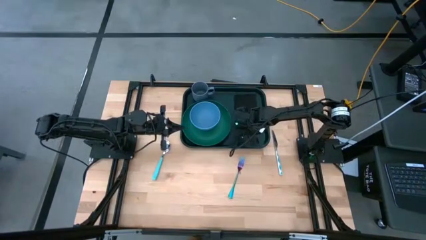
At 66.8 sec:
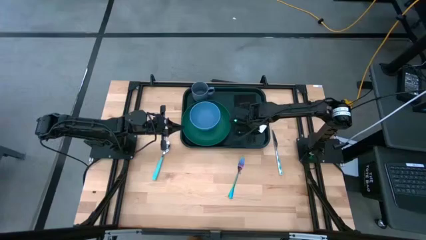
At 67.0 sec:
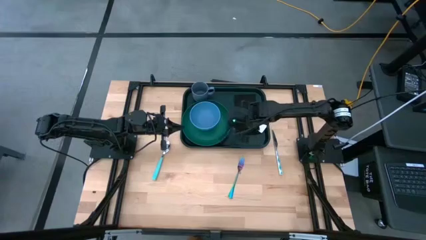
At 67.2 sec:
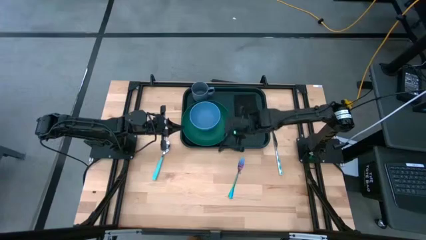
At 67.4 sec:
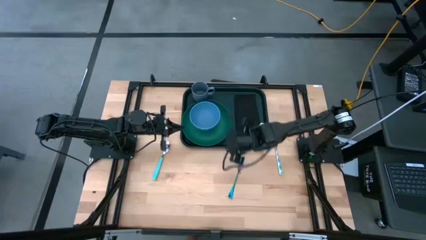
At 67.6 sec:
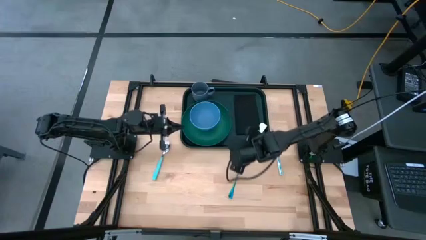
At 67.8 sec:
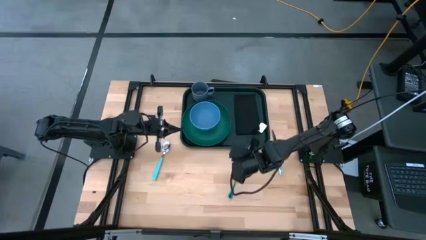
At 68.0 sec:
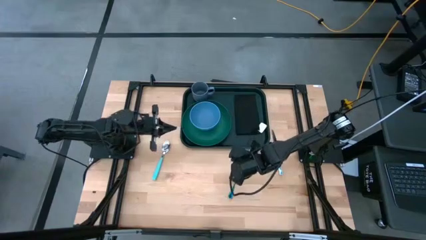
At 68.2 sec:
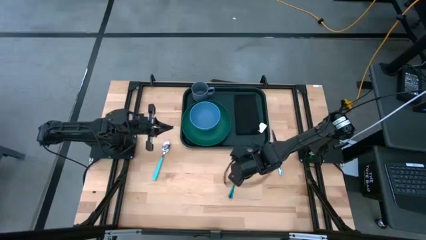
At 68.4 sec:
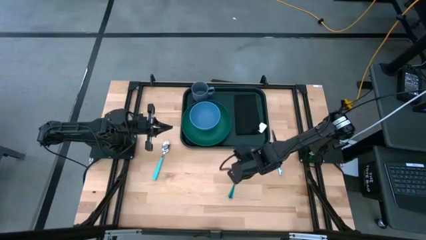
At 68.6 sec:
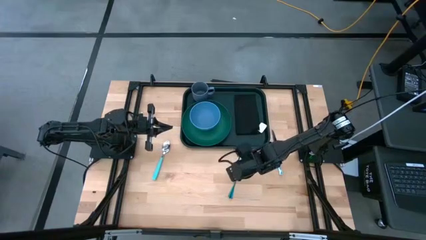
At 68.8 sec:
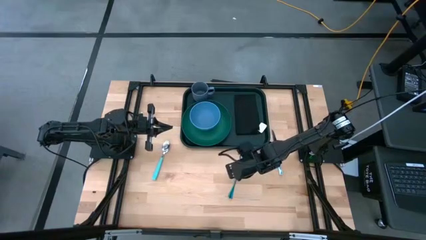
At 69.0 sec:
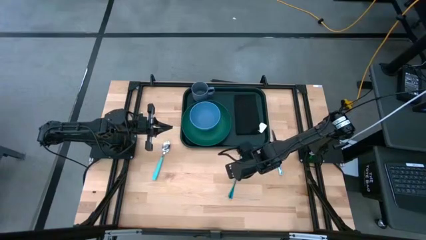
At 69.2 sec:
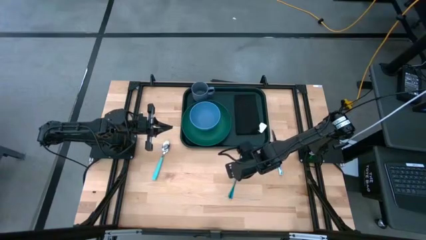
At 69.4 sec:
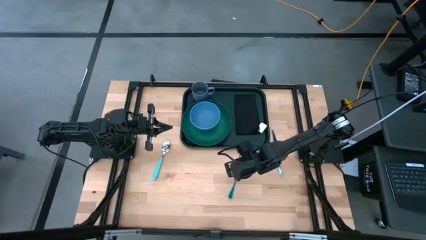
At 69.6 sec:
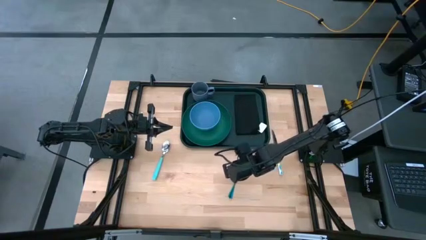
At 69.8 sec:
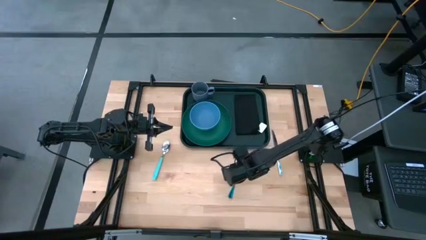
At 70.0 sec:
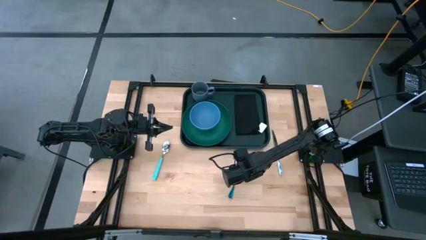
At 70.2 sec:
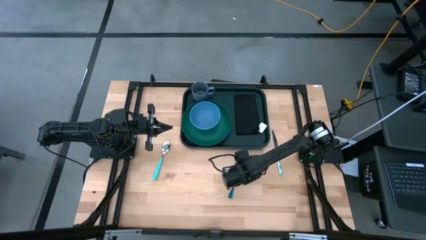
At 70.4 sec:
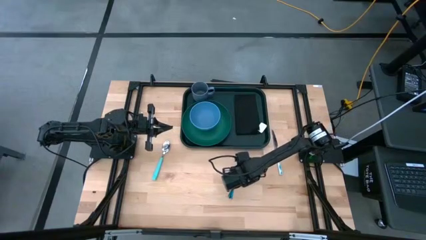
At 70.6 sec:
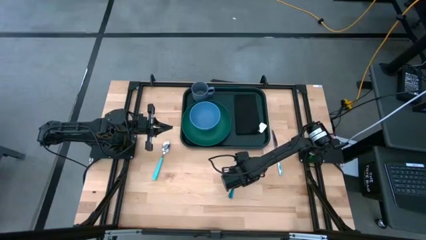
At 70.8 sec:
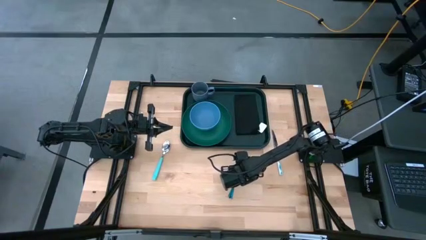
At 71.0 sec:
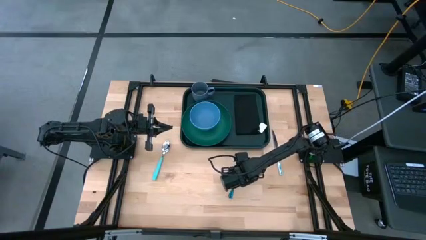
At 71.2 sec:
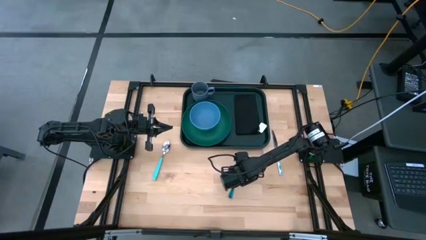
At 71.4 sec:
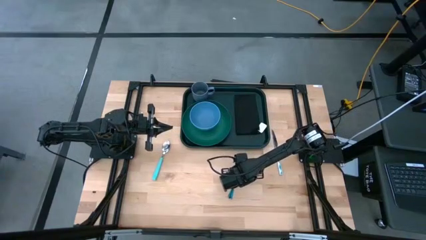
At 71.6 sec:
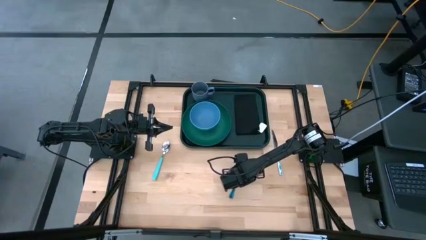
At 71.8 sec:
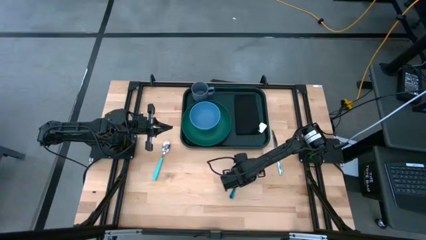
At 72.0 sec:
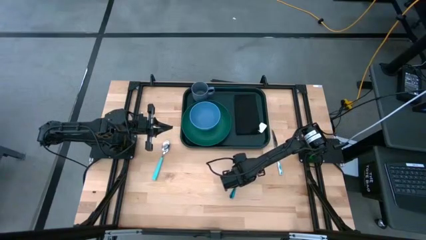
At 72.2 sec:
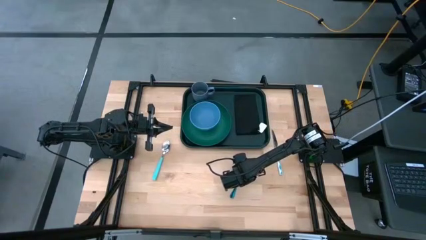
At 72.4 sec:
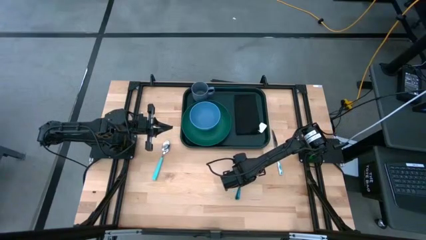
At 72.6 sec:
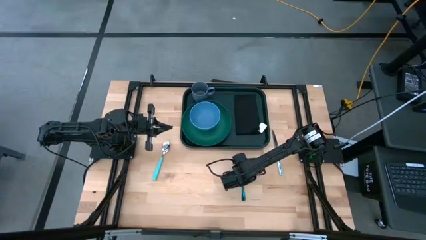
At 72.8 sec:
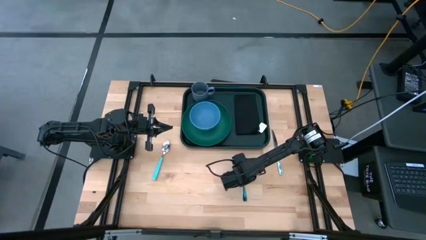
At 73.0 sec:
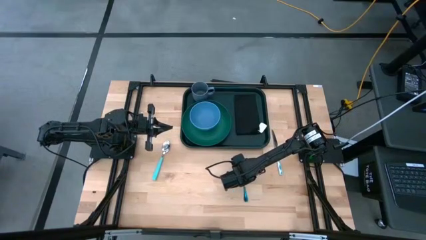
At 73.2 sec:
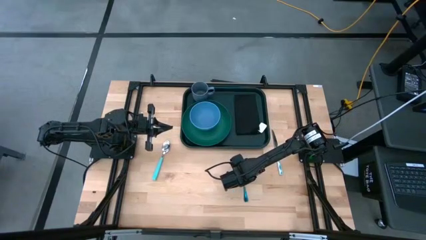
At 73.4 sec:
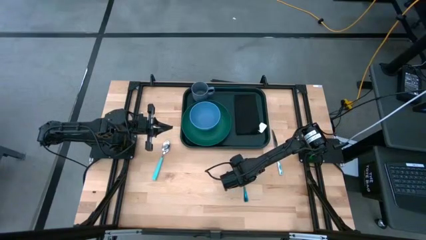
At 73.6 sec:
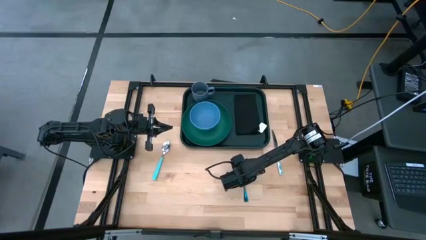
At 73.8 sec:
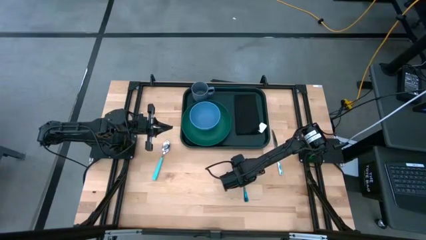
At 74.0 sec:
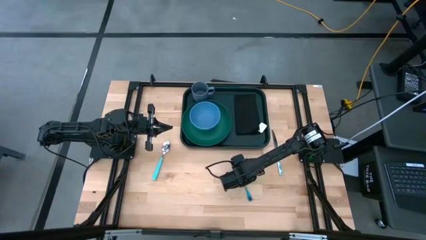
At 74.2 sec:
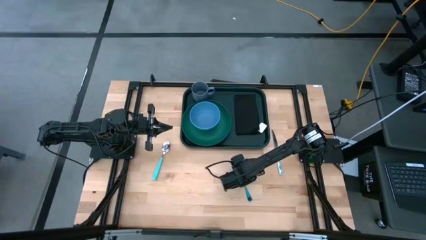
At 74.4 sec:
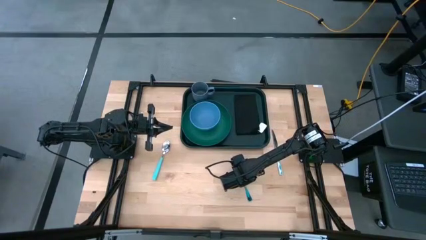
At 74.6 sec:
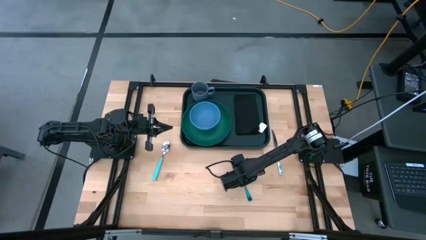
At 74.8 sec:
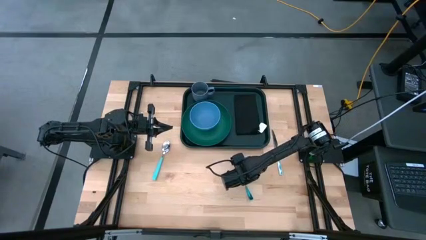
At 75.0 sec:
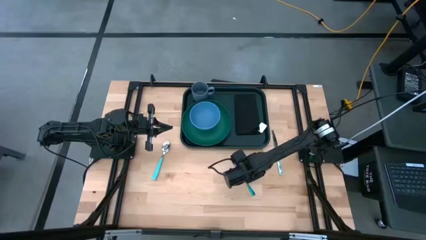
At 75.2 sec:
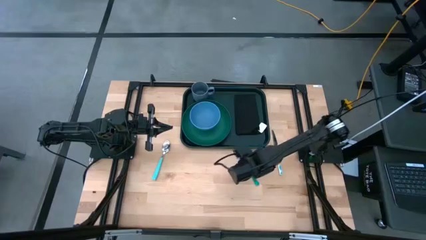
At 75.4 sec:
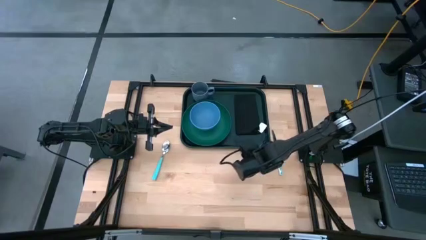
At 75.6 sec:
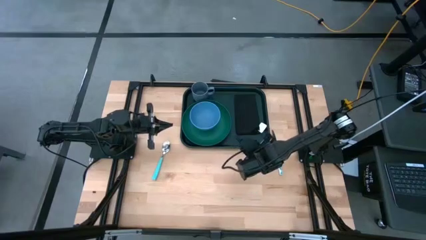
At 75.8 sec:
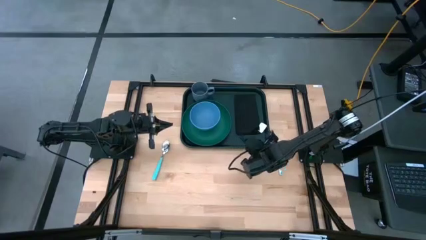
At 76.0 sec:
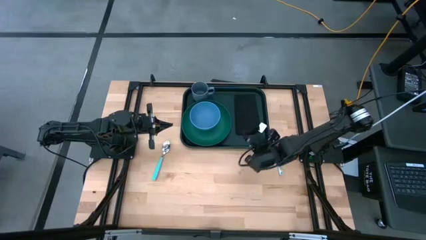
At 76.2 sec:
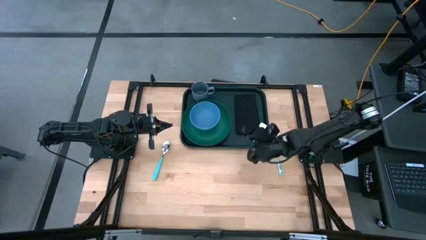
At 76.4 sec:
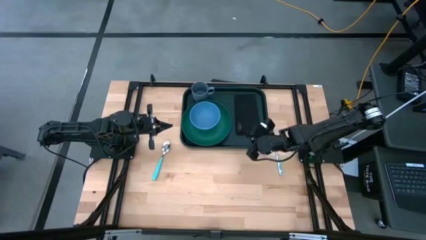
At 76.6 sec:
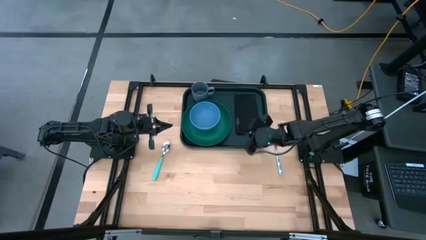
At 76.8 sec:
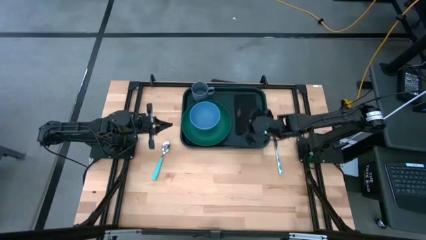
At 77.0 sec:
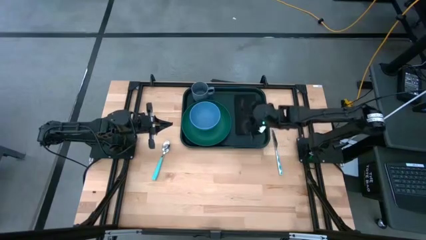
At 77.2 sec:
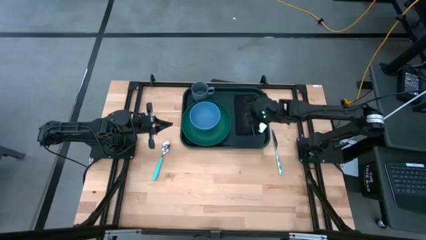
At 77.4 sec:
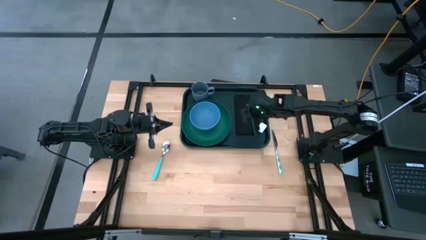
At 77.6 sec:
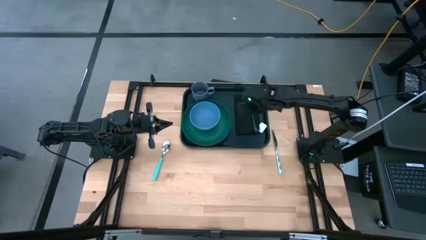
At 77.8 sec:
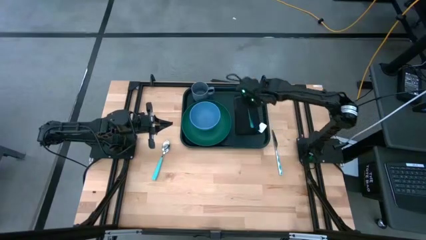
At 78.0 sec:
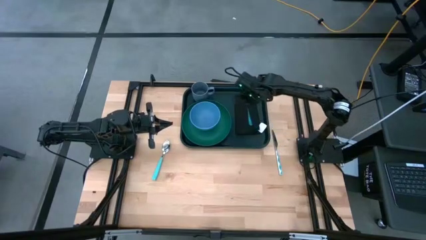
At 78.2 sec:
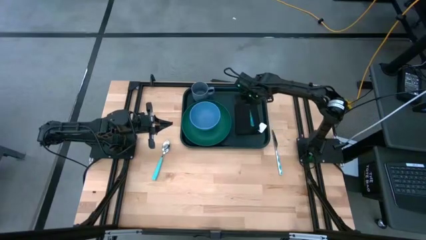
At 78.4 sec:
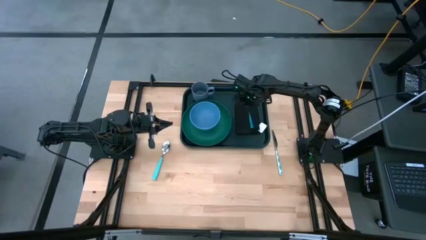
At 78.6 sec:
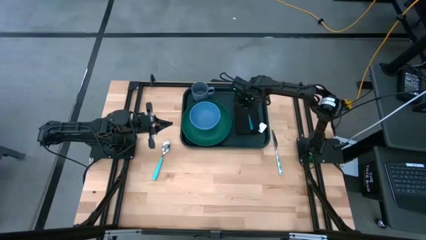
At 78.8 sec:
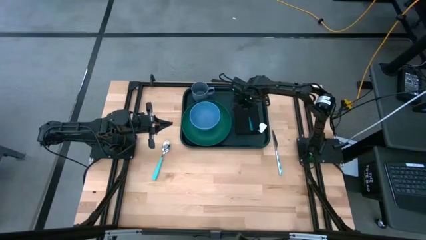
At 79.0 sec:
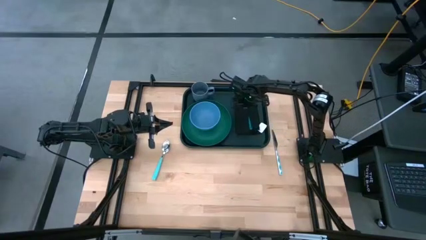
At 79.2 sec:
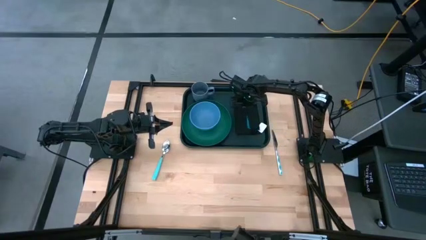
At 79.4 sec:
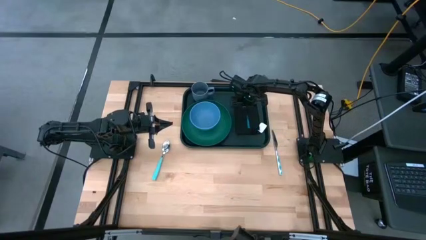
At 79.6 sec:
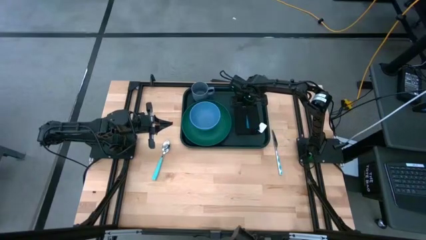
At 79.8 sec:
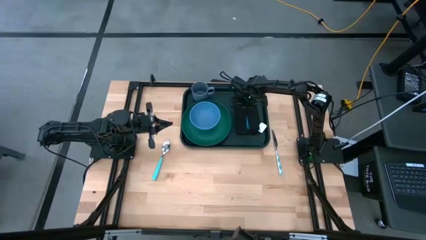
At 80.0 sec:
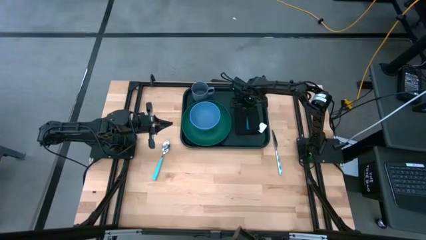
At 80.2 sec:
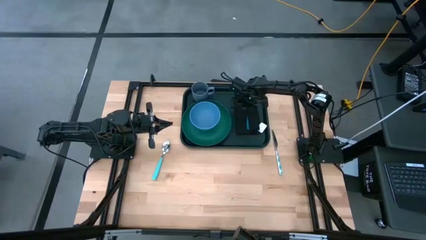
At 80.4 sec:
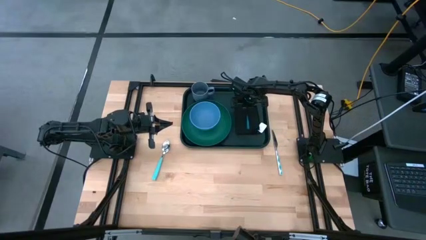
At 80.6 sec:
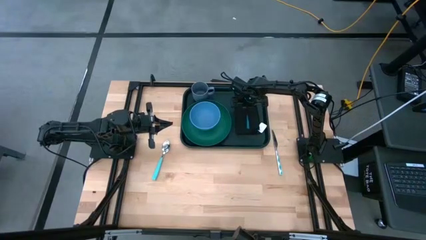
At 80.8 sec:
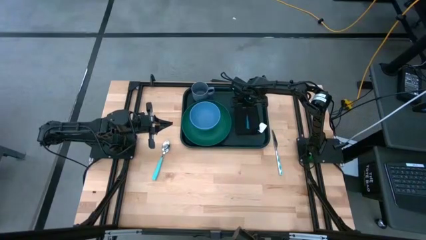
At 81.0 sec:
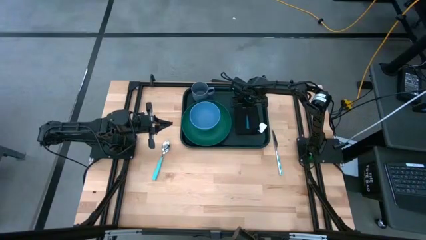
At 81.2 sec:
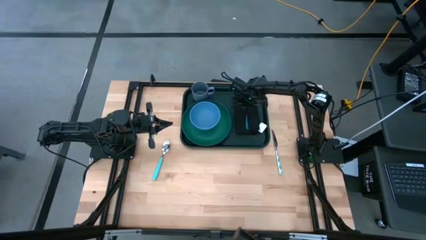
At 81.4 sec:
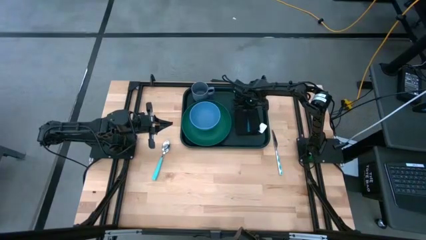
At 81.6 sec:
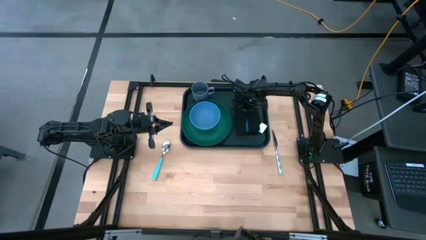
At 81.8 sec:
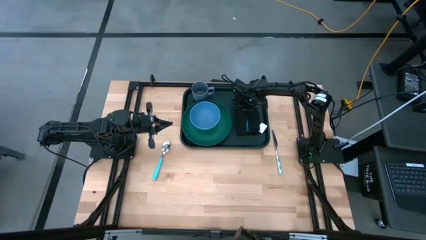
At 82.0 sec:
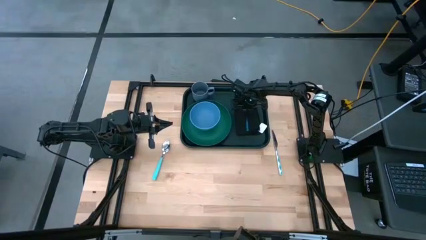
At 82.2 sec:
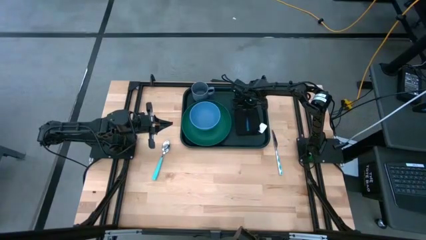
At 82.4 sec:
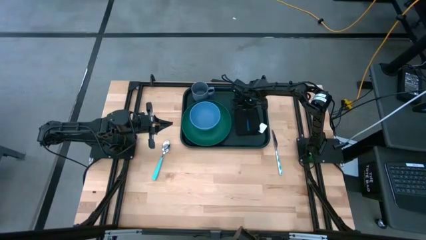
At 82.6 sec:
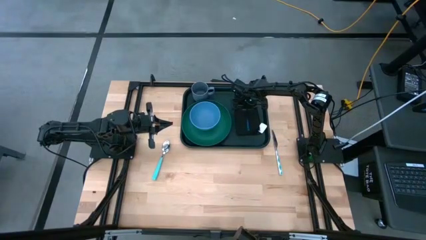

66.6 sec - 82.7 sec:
Task: Set up tray
Put the blue fork on the black napkin
